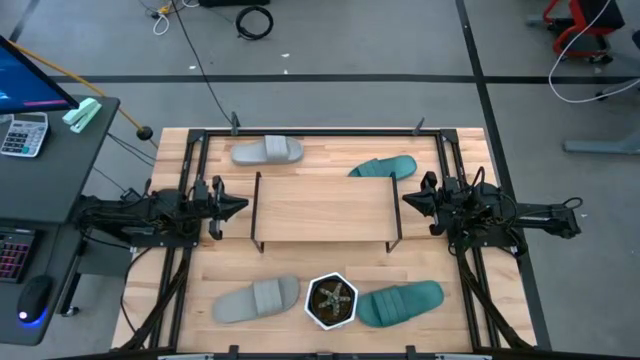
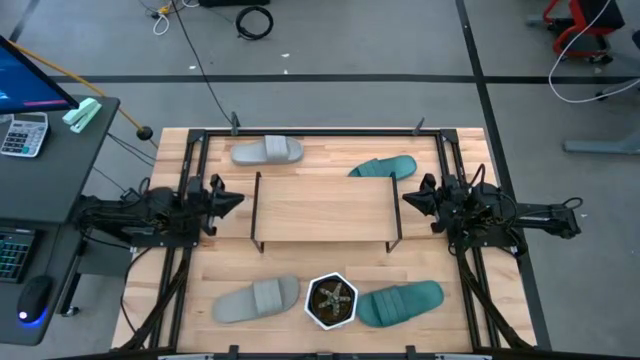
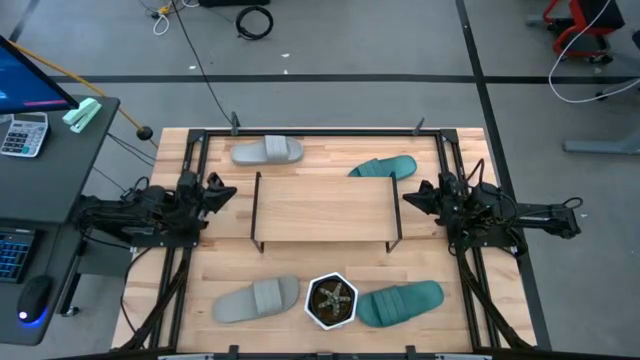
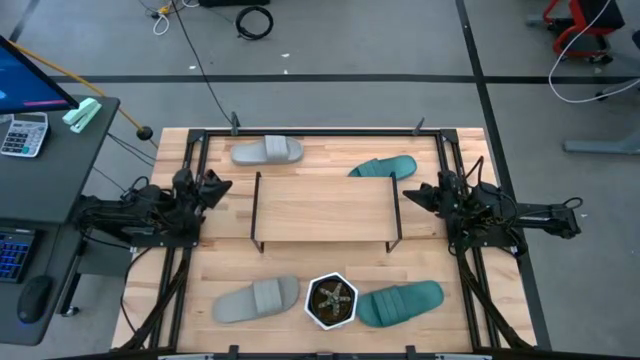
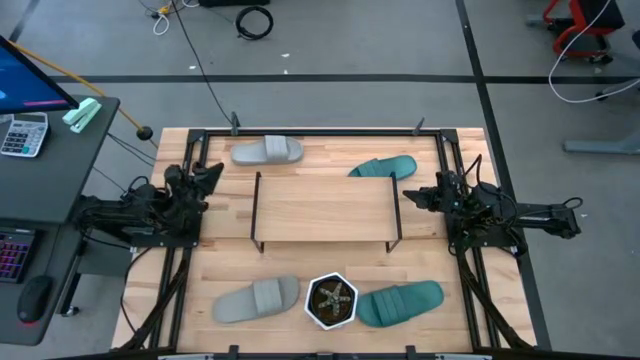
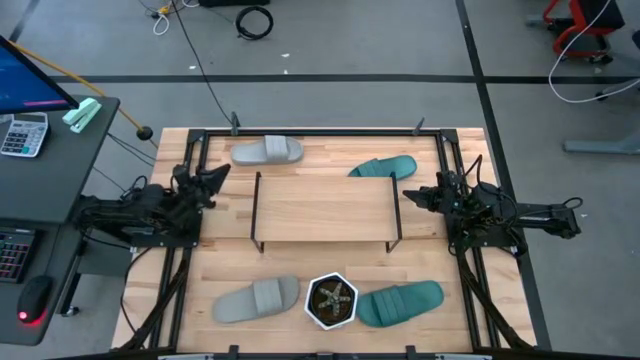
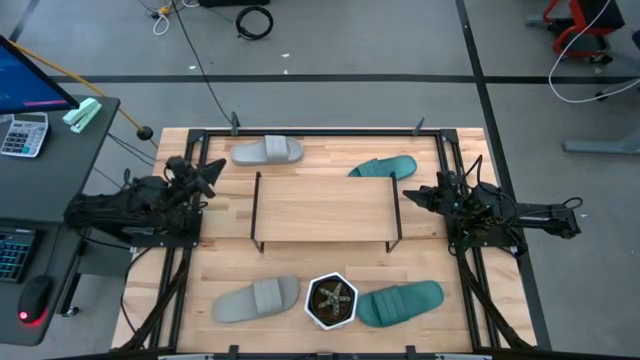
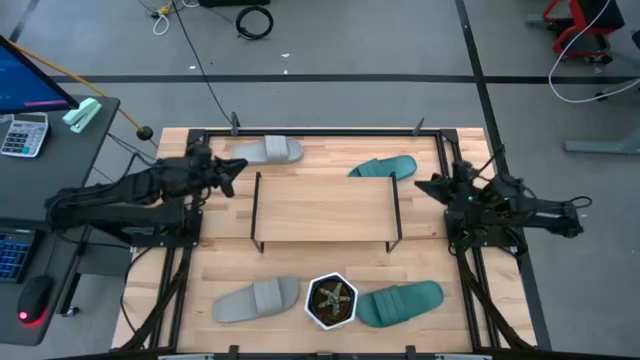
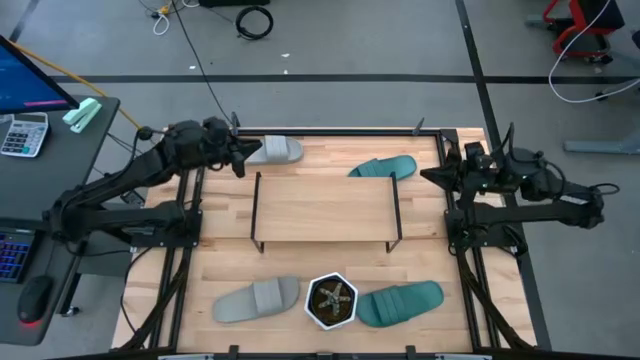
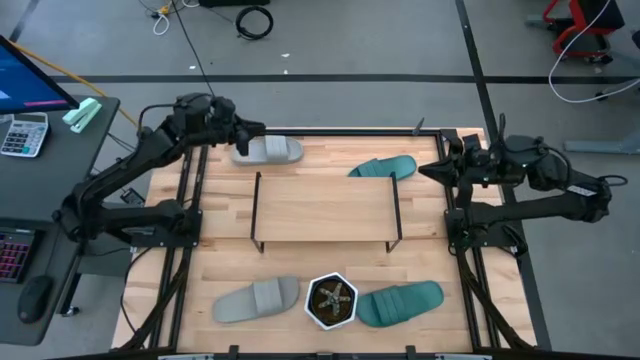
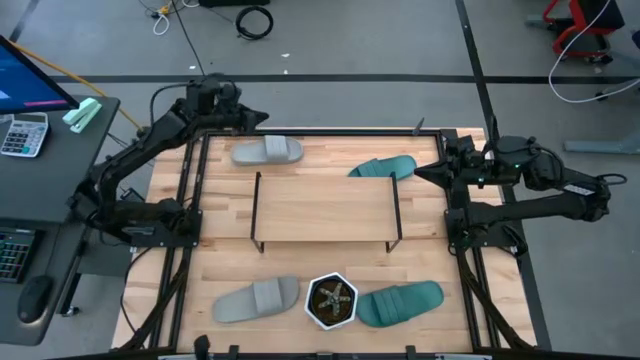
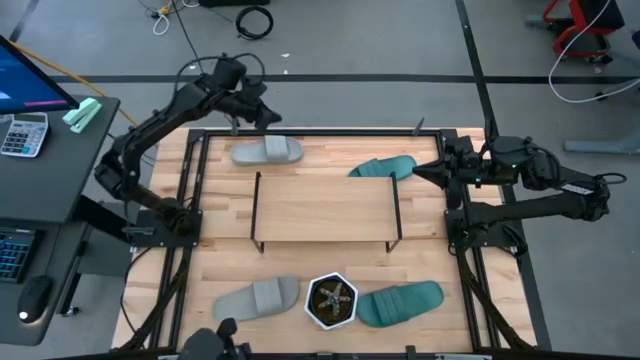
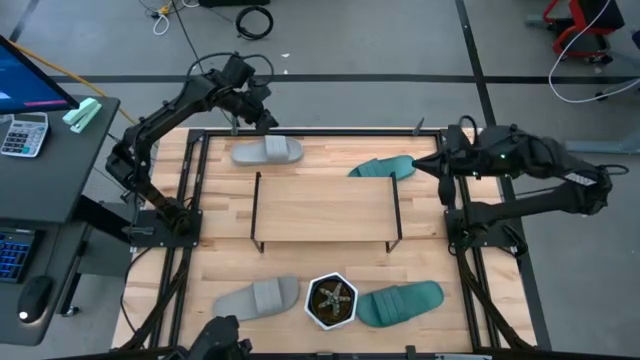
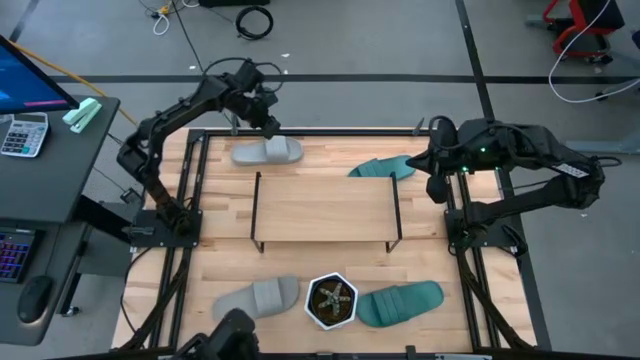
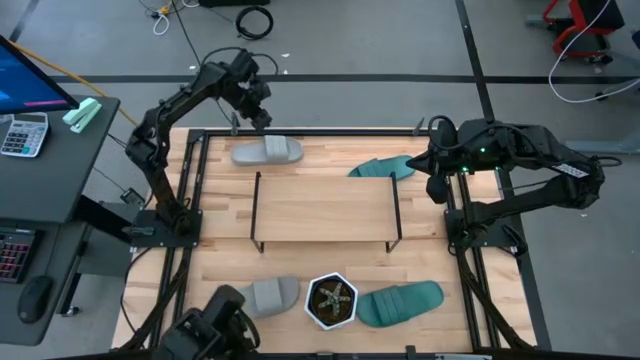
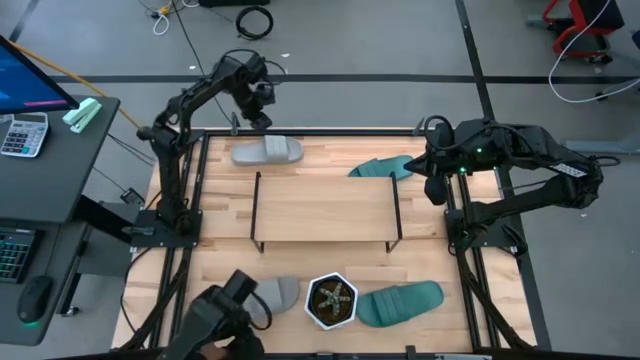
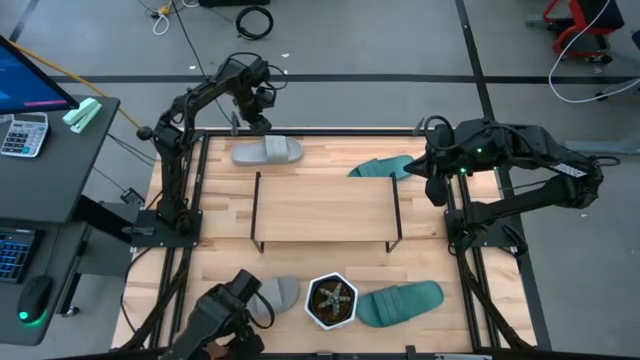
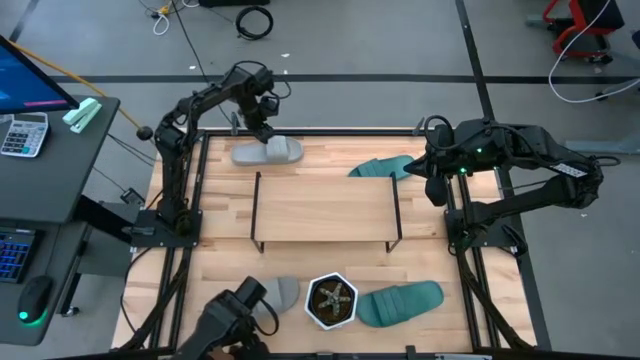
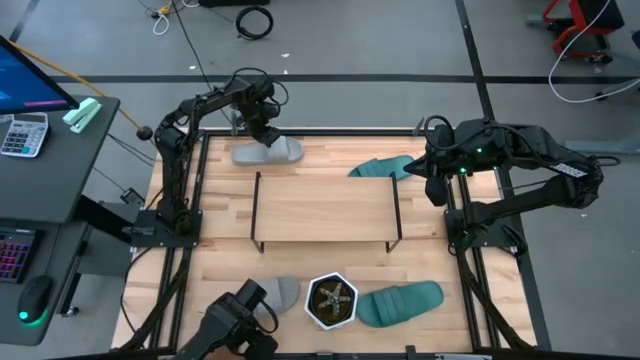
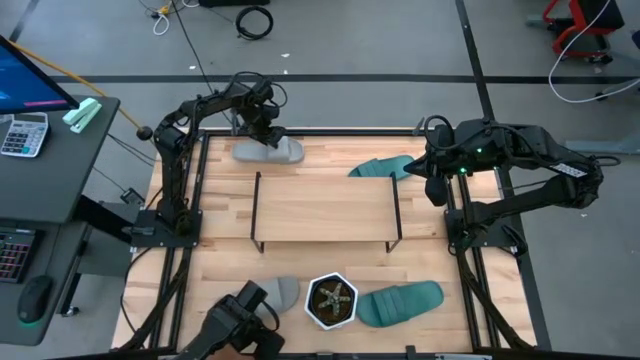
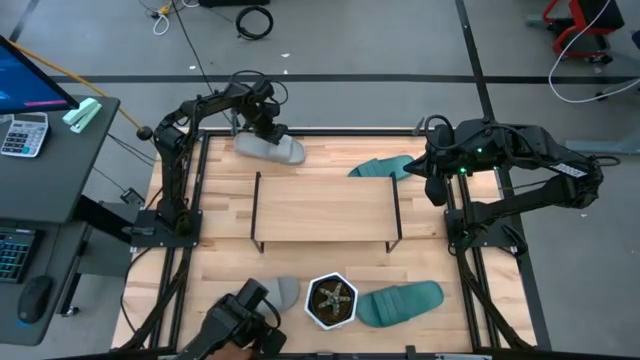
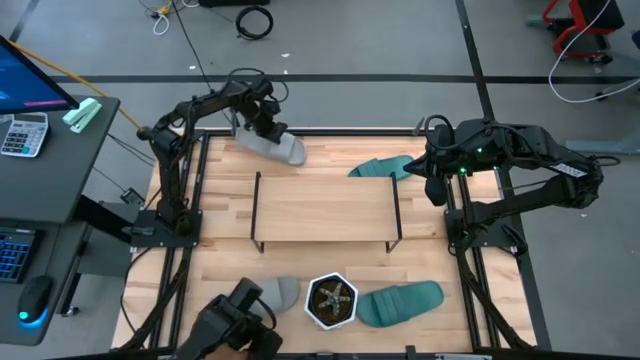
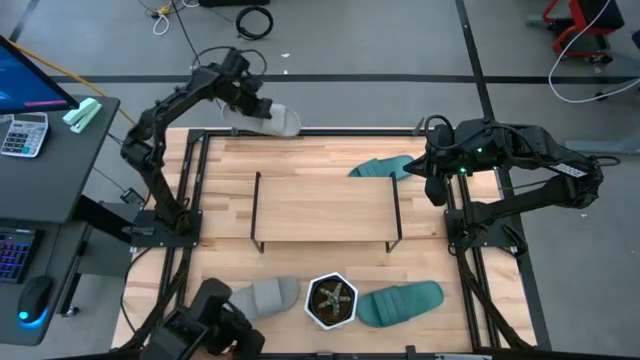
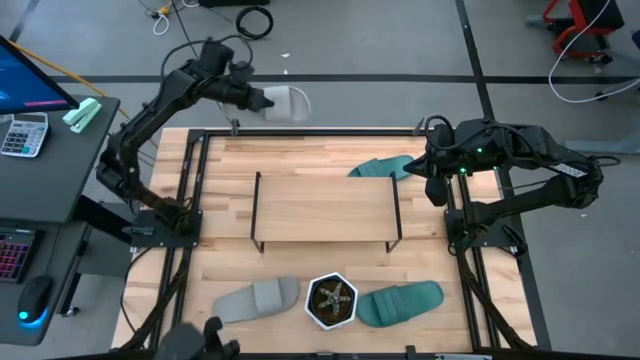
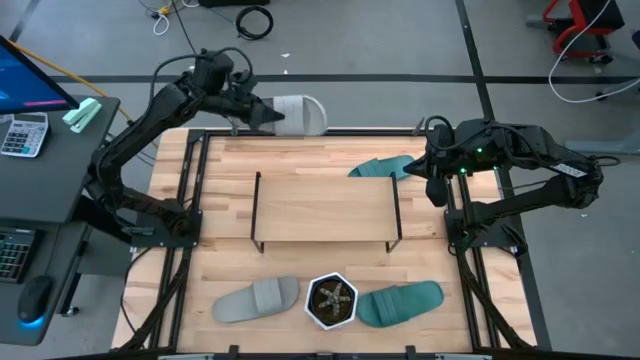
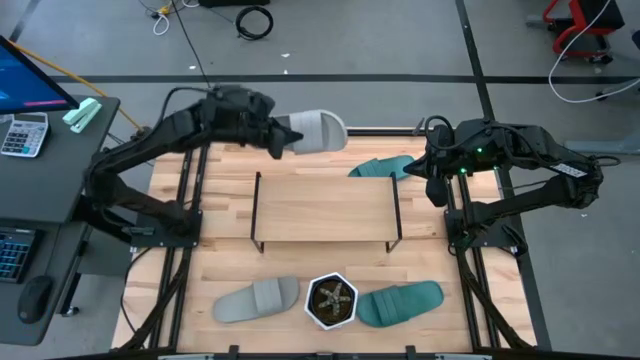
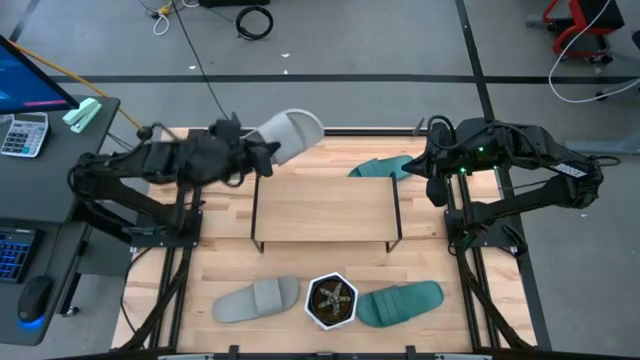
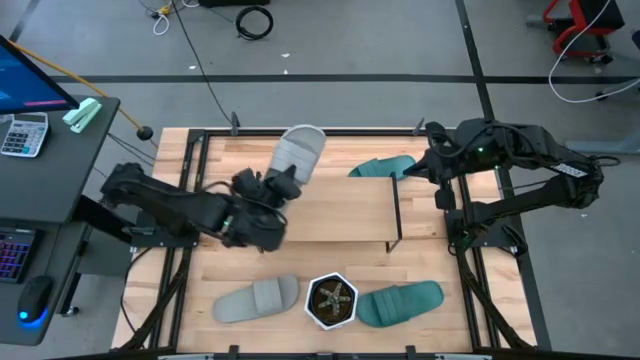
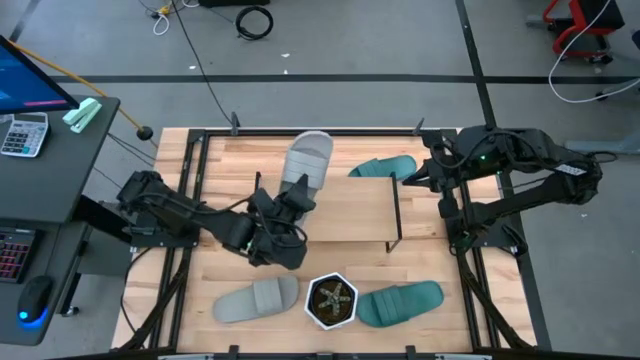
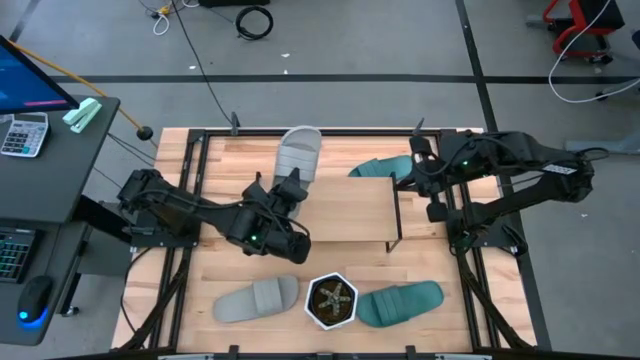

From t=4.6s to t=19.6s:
Task: Pick and place slides into the shelf
Put the top gray slide on the shelf

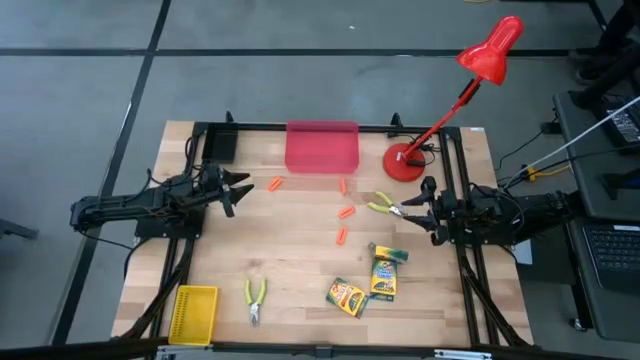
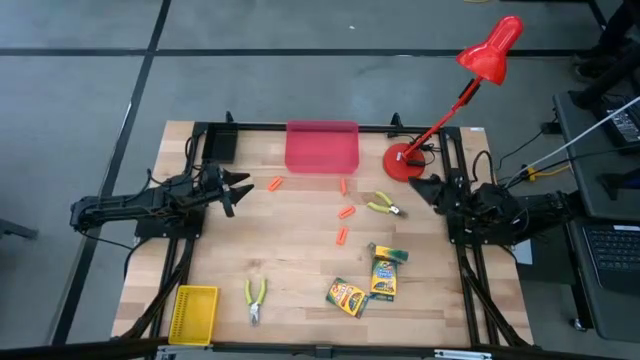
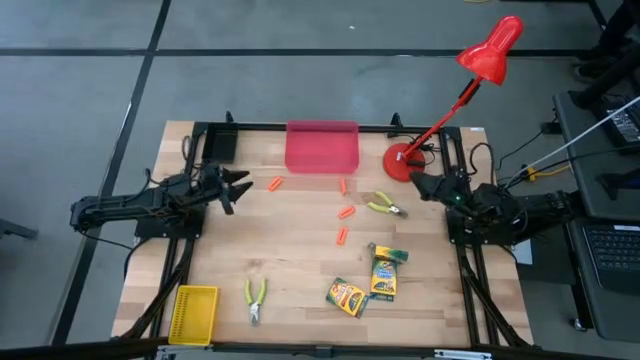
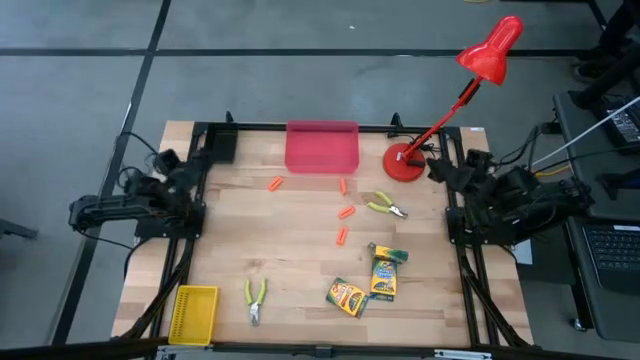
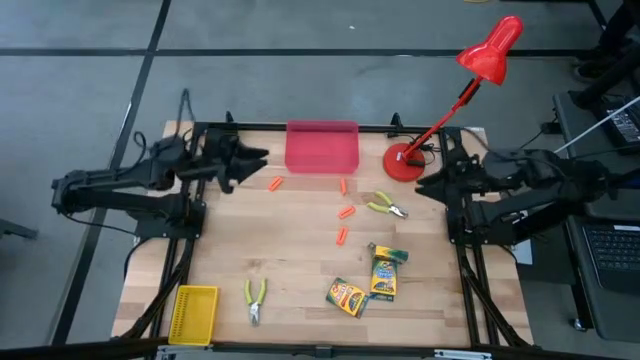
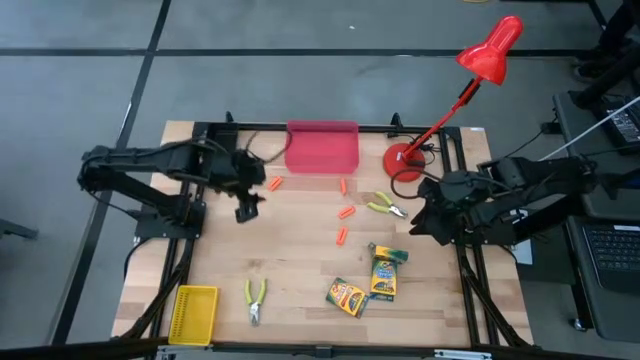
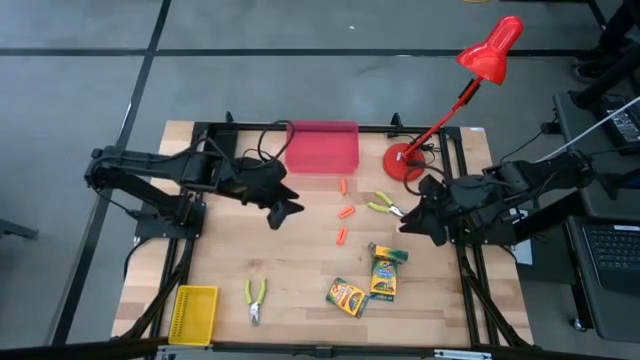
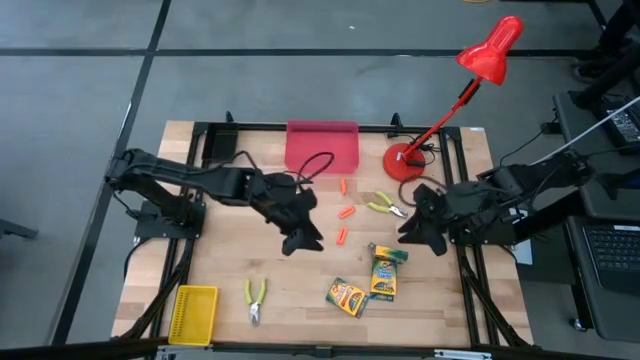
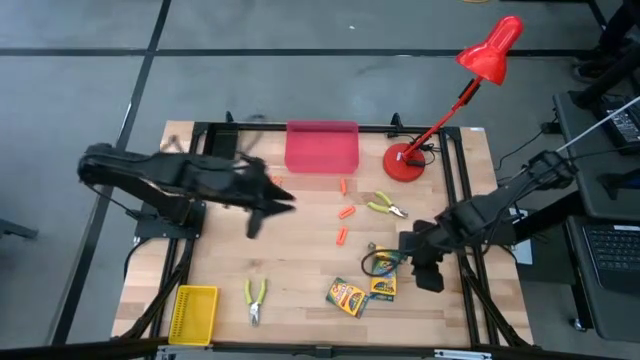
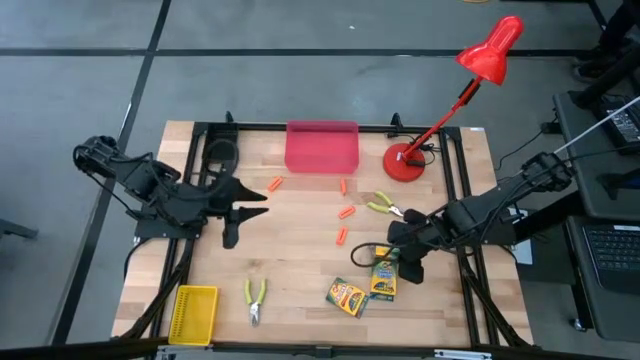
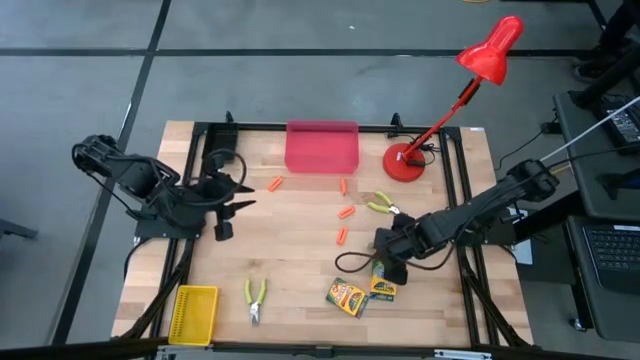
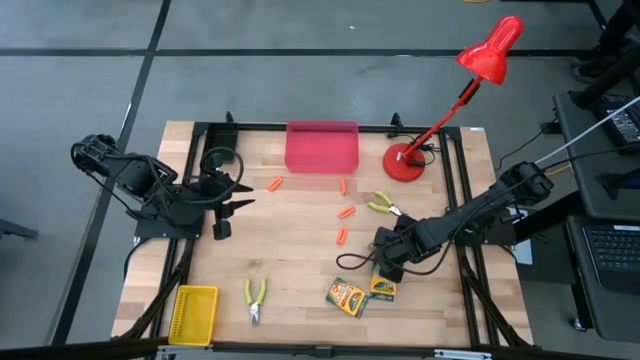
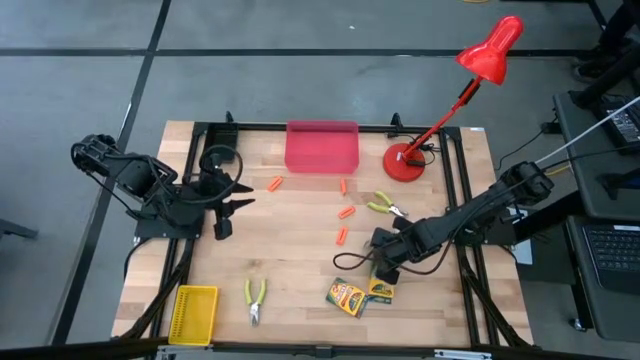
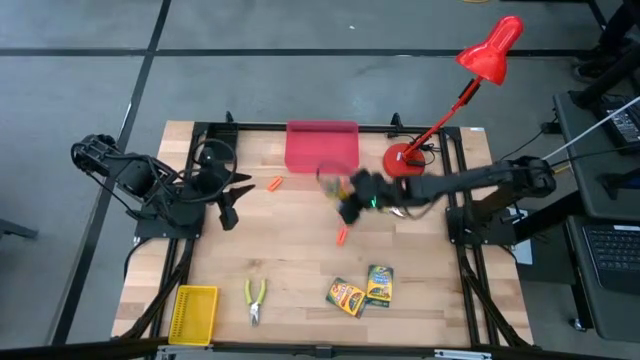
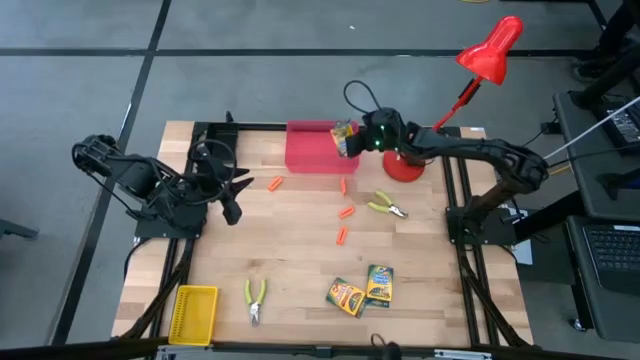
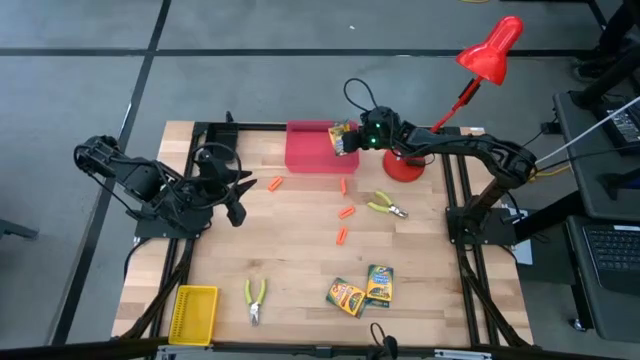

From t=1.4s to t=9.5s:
Task: Pick & Place School Supplies
Put the yellow crayon box into the red bin
